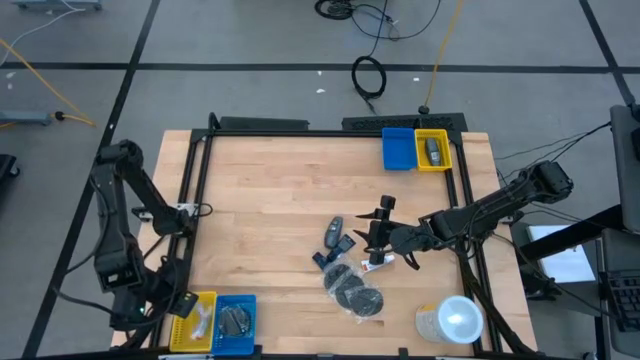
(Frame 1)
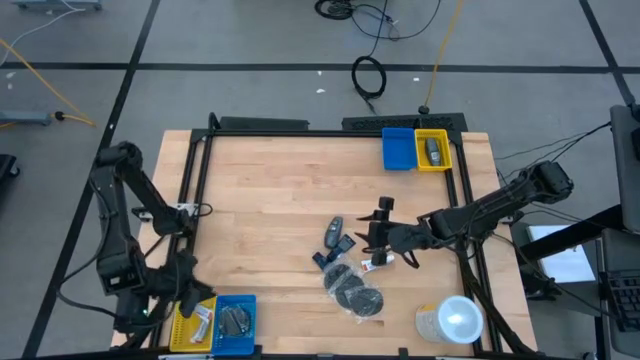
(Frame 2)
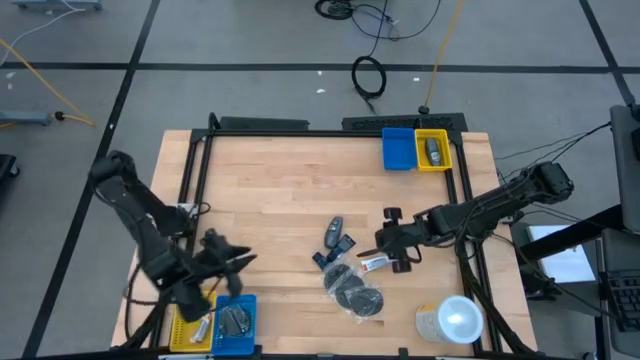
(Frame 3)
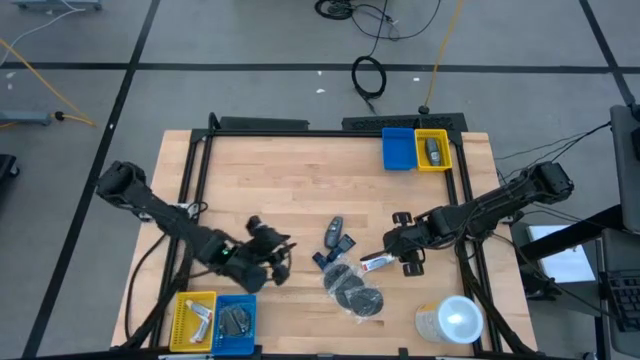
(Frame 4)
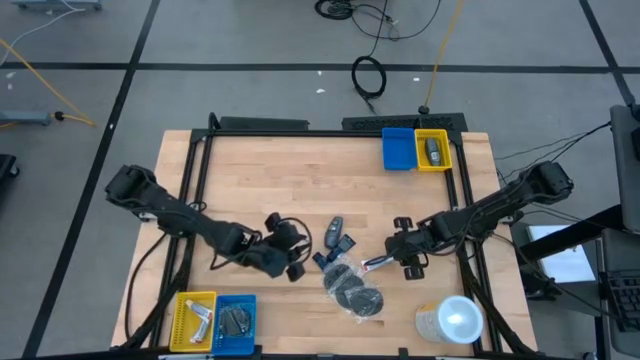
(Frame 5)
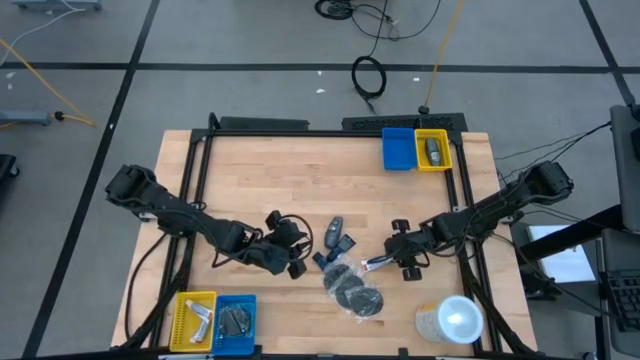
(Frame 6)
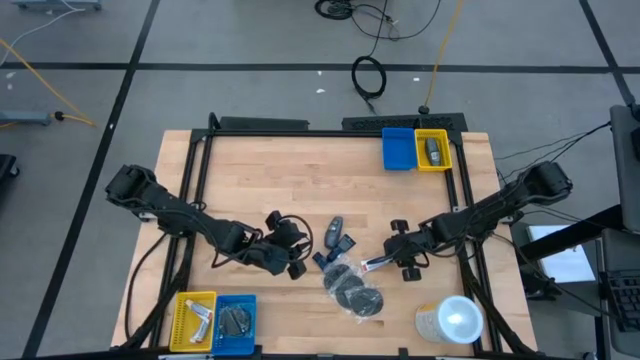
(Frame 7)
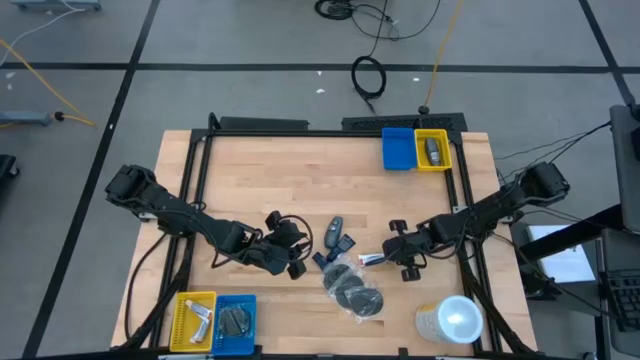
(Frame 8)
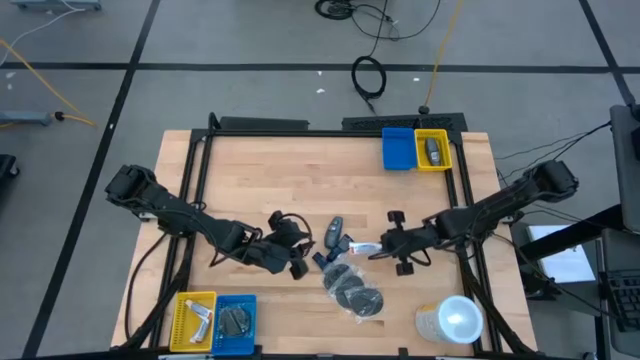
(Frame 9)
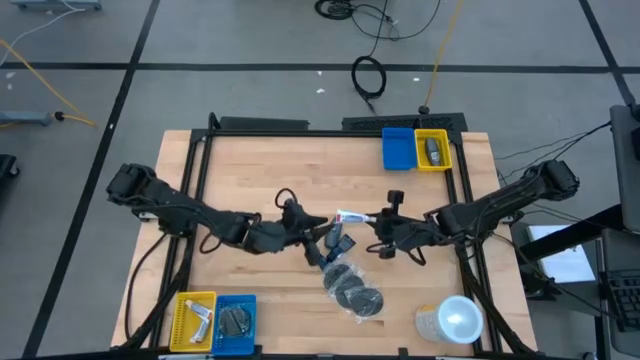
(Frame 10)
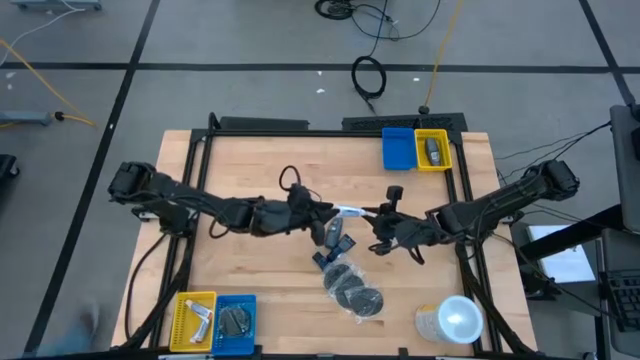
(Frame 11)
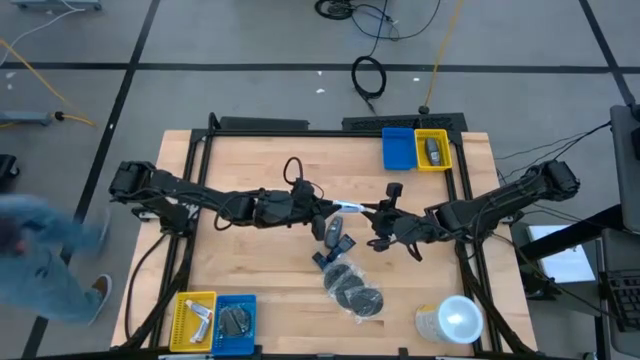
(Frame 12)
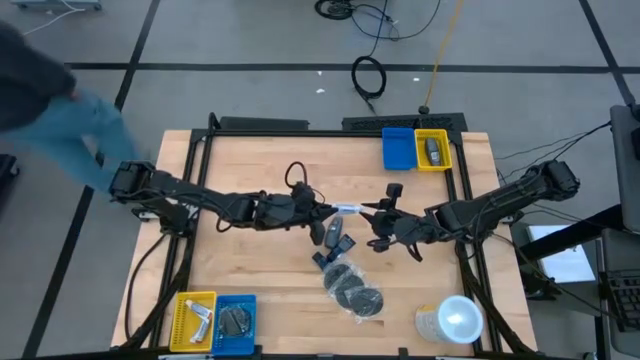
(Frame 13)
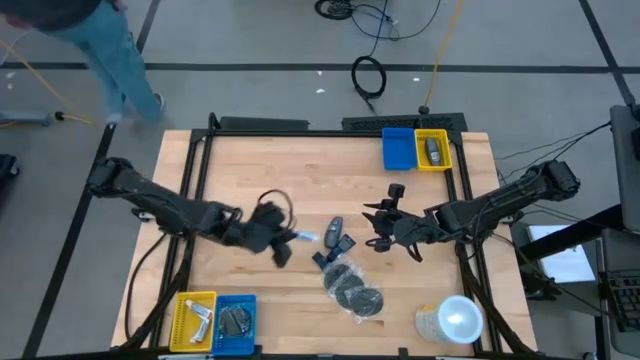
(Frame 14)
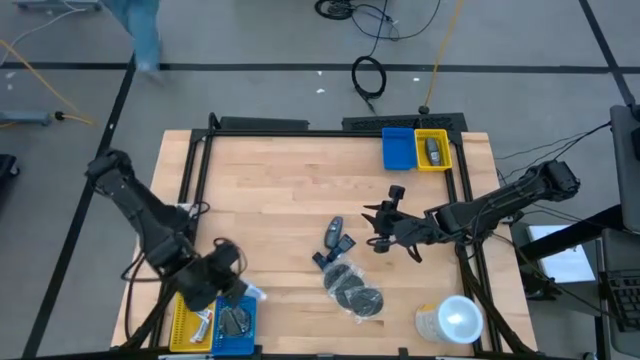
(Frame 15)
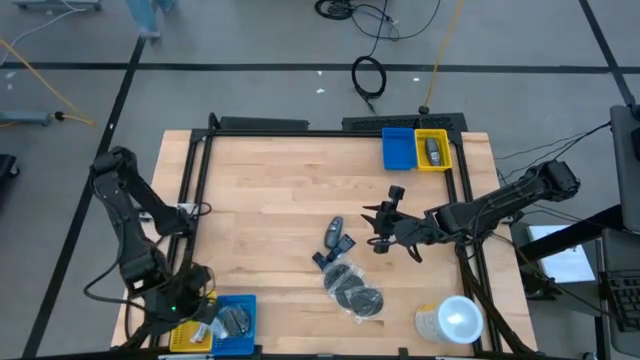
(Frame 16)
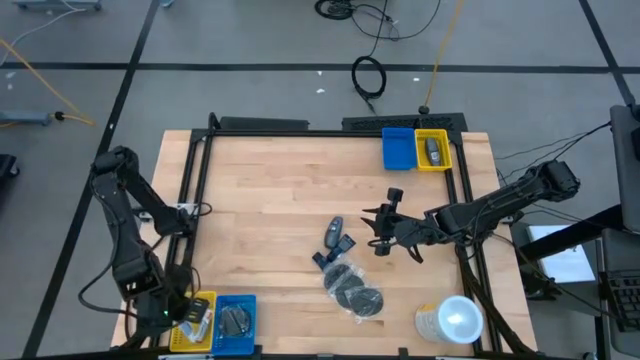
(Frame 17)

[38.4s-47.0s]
Task: Pick & Place Travel size toiletries
Put the white toothpaste into the bottom yellow bin

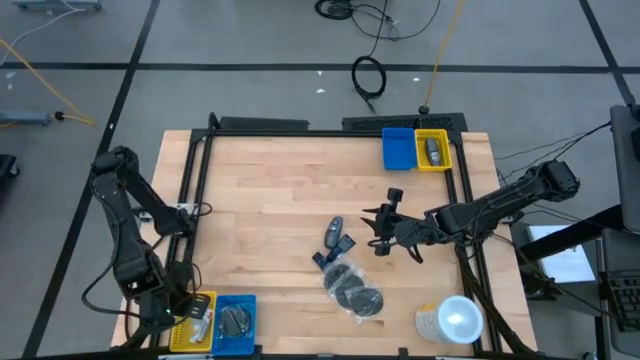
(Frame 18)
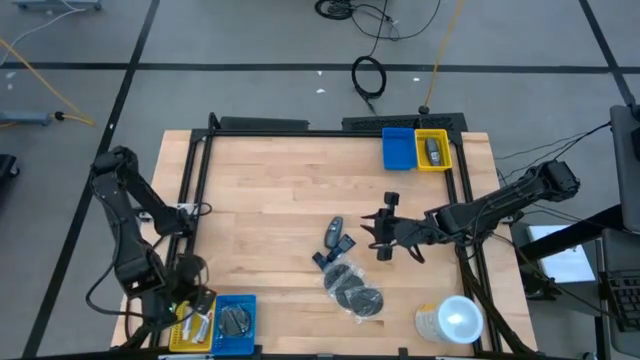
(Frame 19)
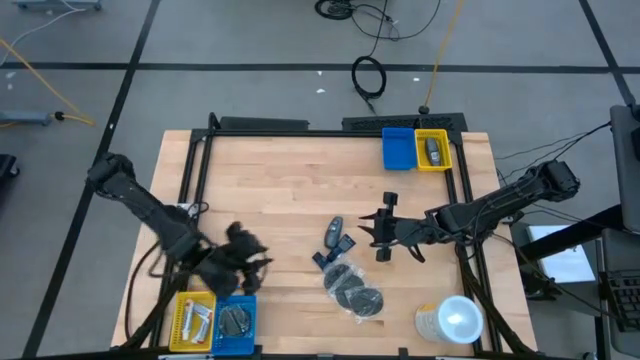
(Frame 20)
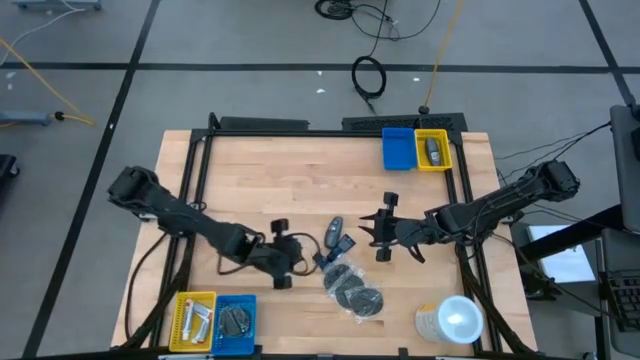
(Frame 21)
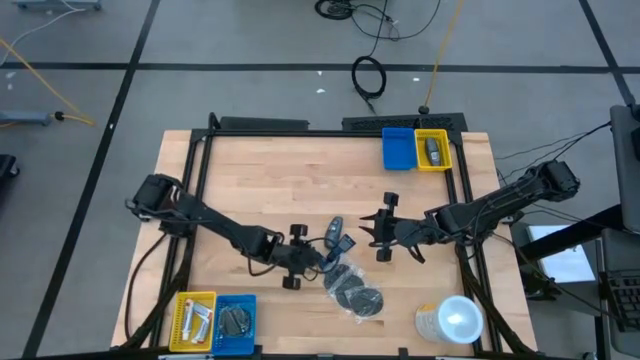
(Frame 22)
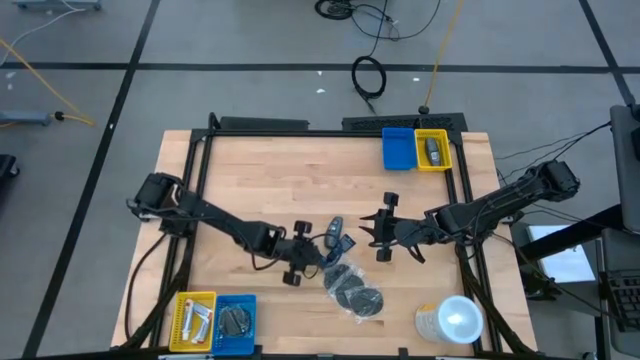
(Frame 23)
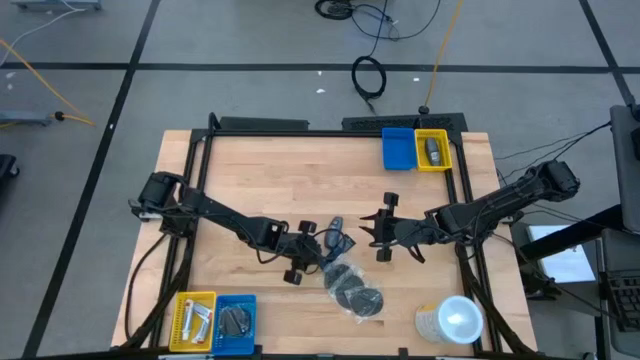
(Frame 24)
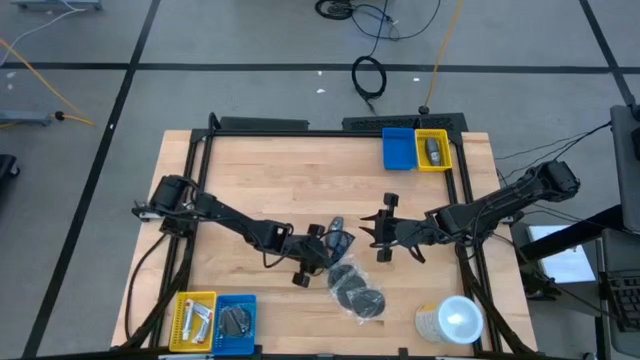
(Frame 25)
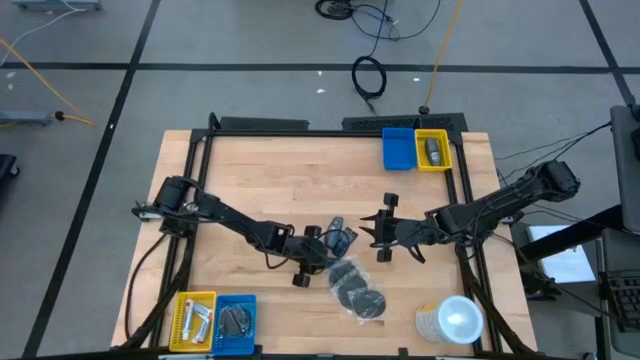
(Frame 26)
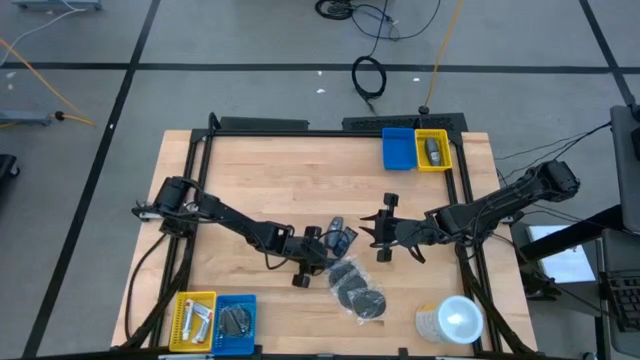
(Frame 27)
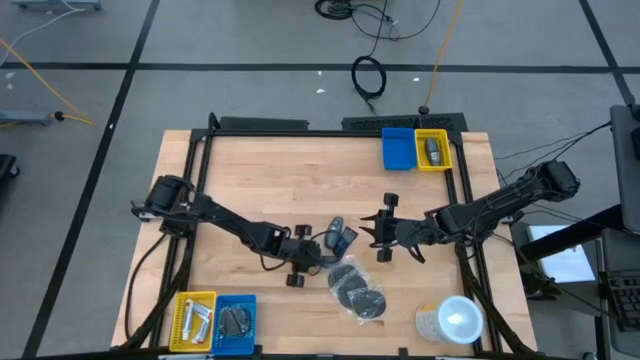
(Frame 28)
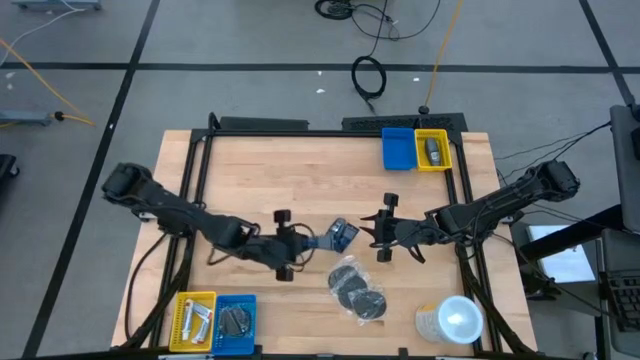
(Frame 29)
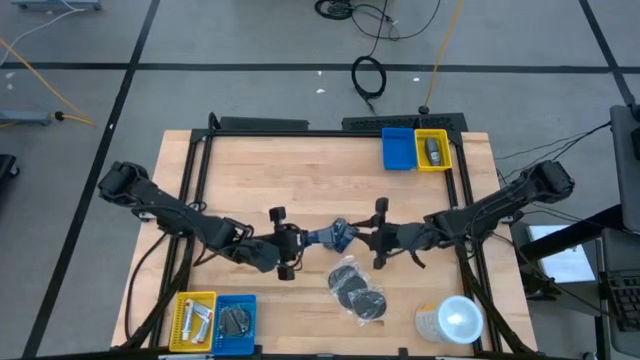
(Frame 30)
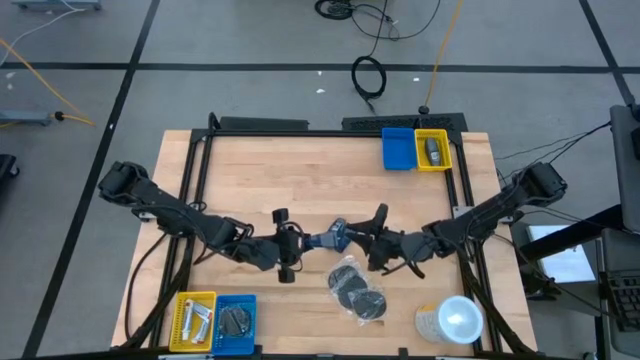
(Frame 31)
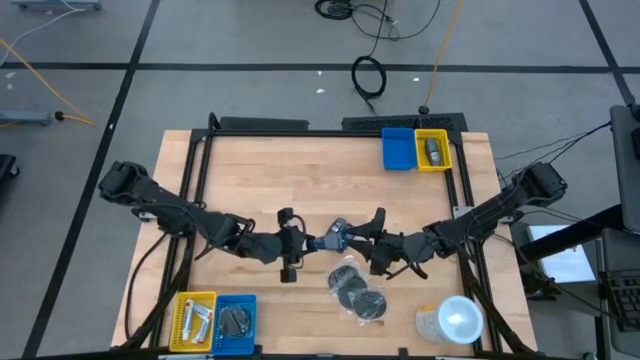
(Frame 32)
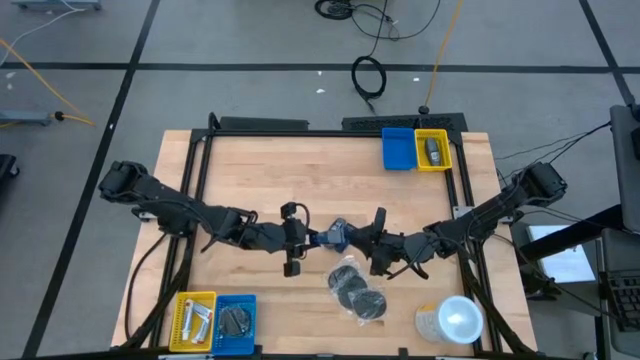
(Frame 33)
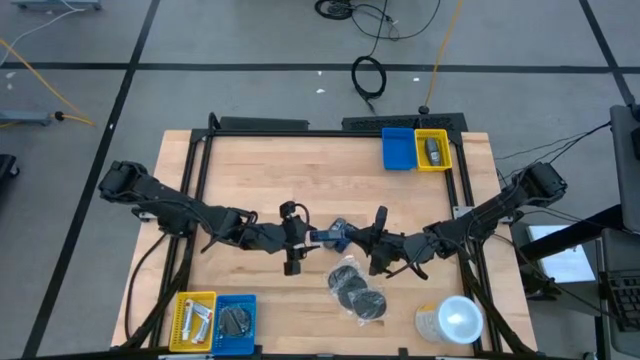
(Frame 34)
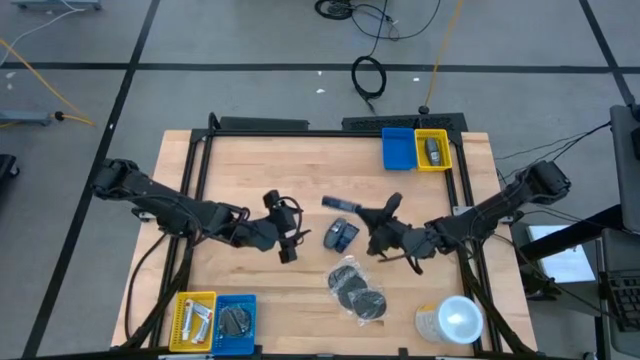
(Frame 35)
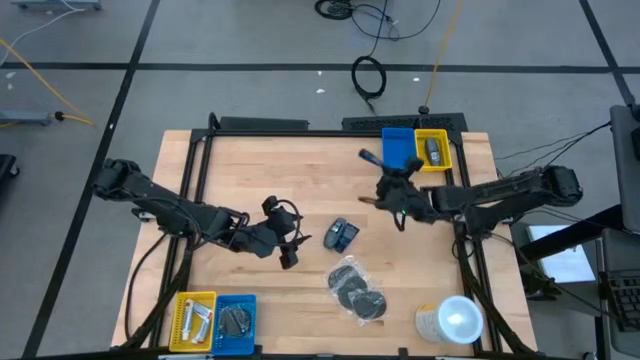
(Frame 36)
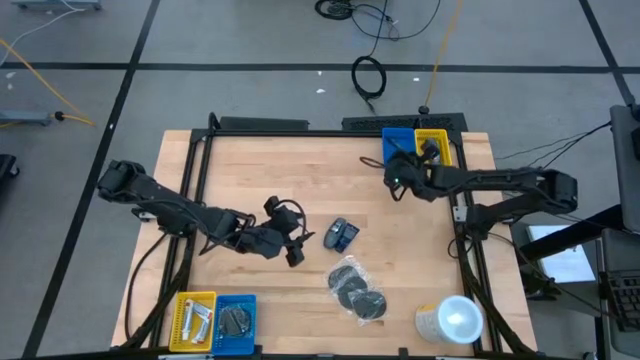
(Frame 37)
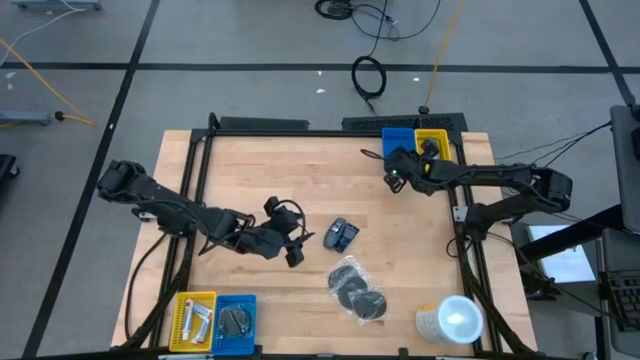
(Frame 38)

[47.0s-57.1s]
Put the blue shave cream into the top blue bin

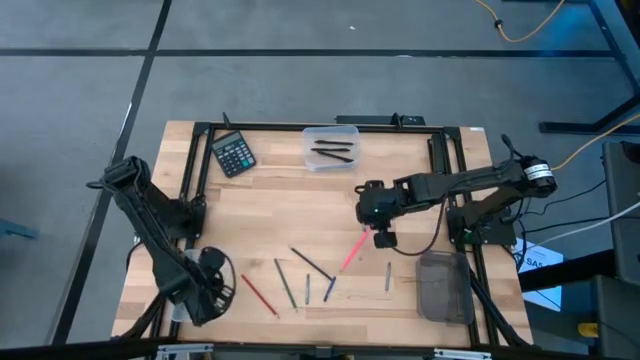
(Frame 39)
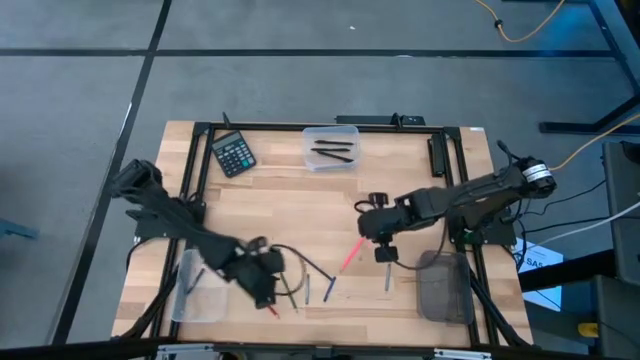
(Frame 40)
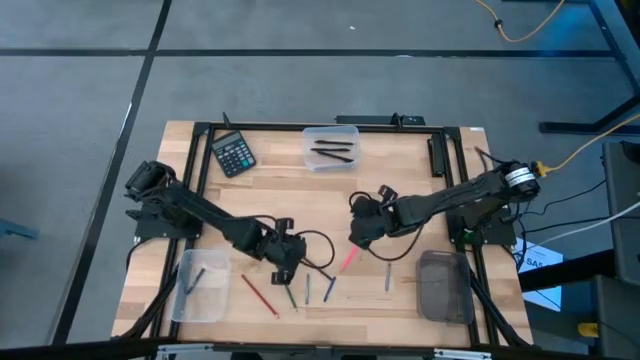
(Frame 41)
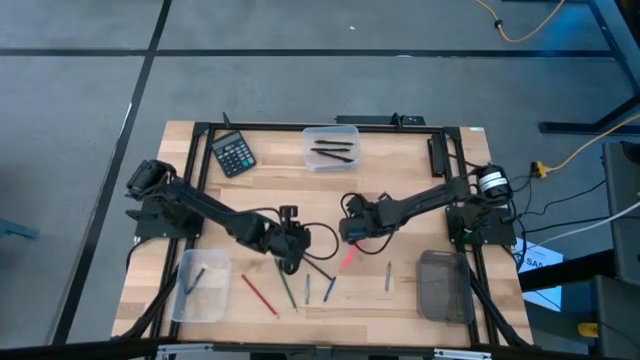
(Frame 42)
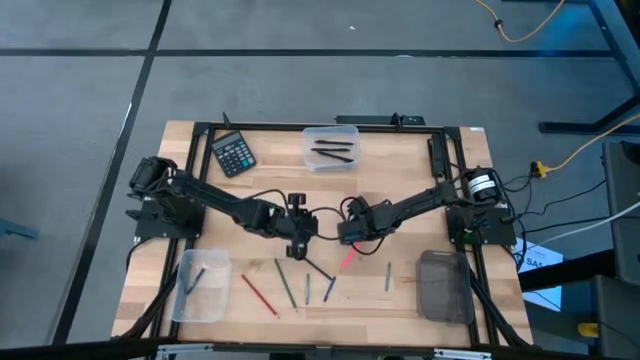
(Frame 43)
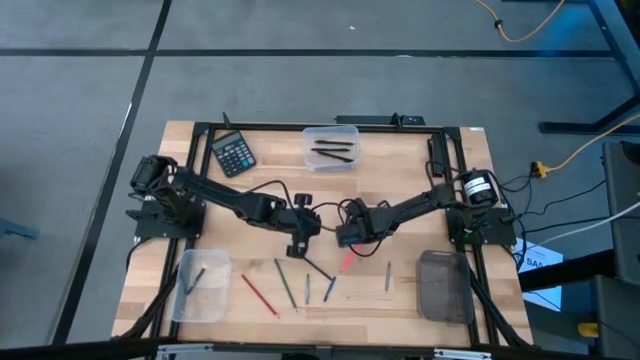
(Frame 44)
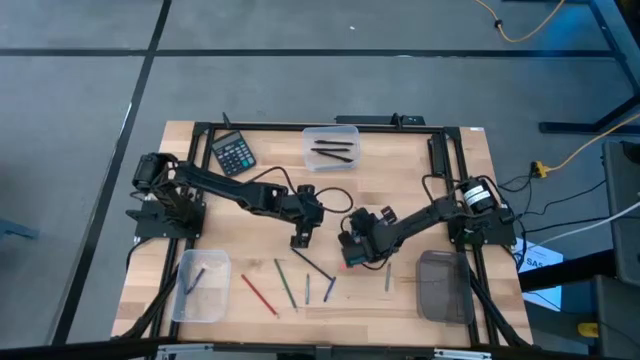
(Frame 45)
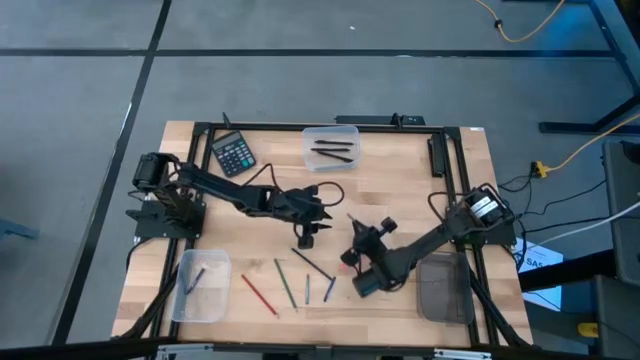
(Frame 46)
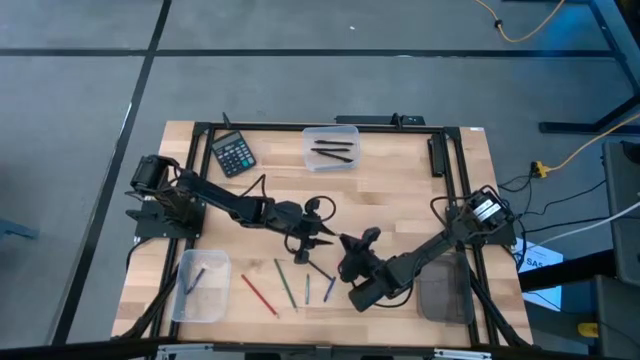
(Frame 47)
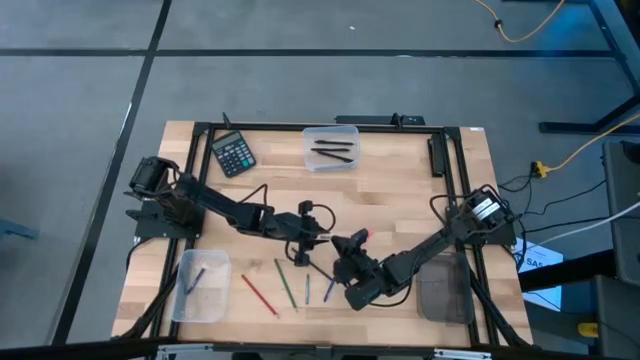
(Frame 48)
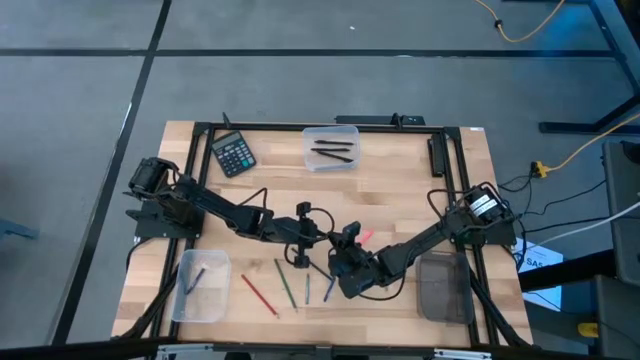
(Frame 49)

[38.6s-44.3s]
Task: Sort crayons/erasers/pens/pencils in bins
Put the top gray crayon into the bottom transparent bin
